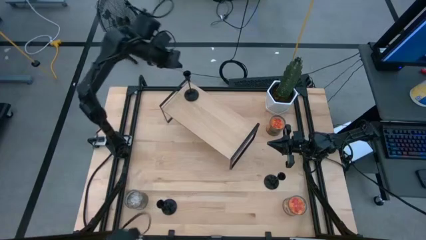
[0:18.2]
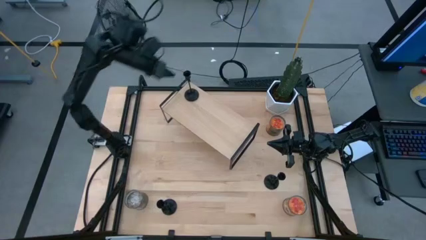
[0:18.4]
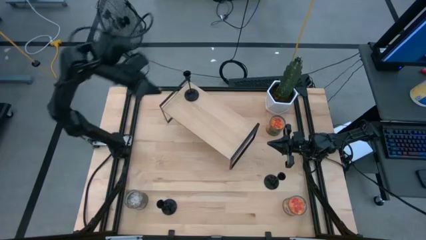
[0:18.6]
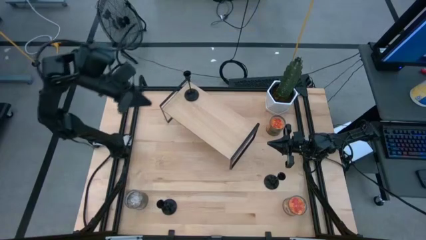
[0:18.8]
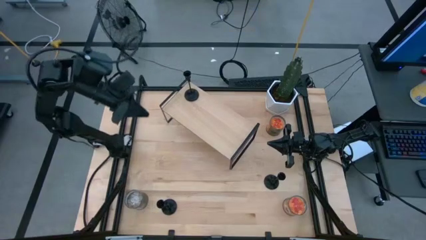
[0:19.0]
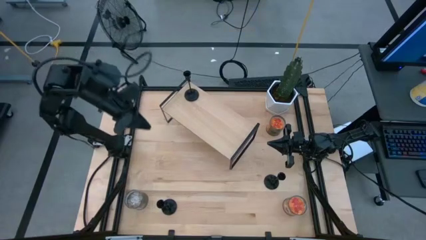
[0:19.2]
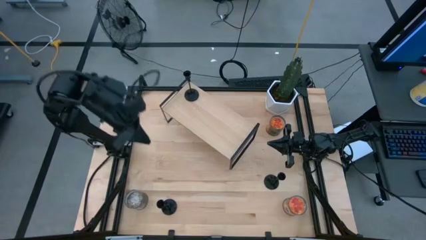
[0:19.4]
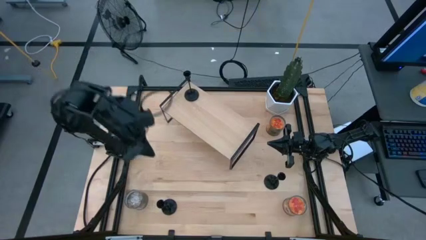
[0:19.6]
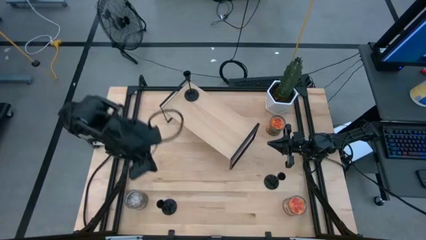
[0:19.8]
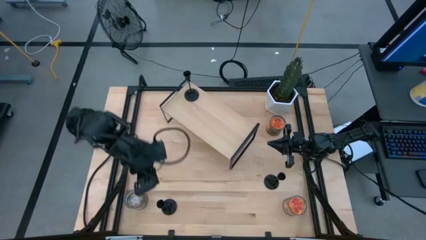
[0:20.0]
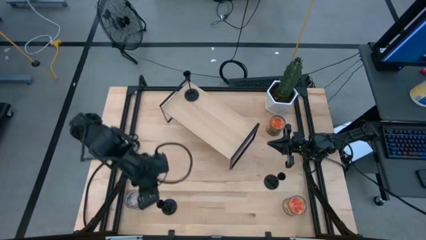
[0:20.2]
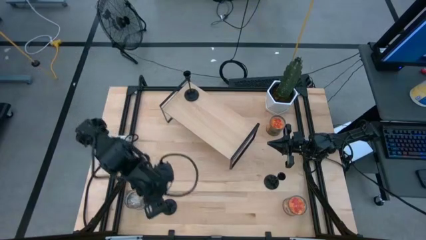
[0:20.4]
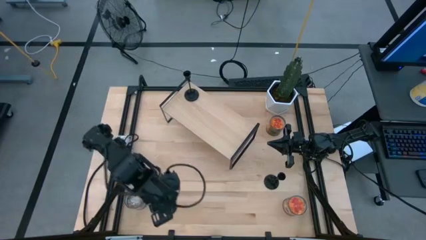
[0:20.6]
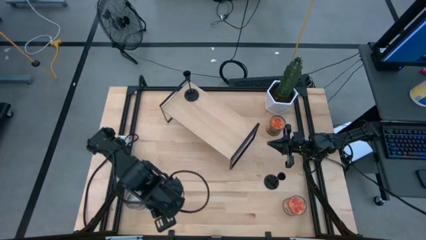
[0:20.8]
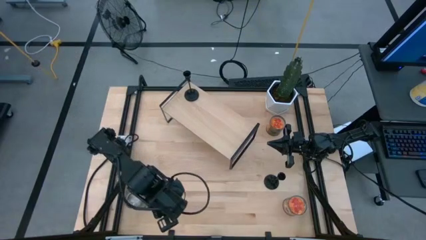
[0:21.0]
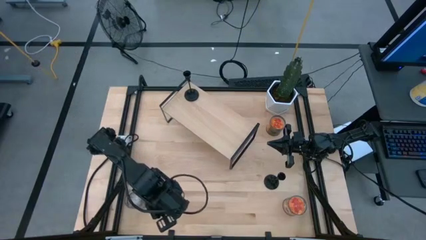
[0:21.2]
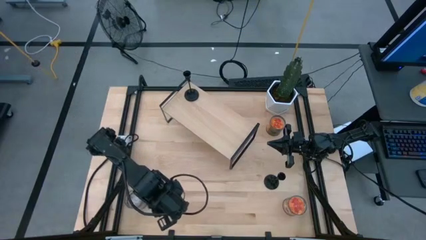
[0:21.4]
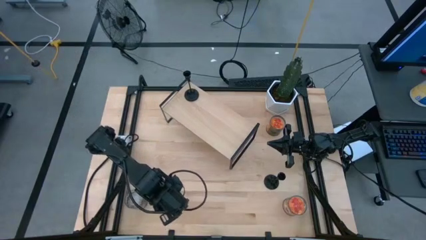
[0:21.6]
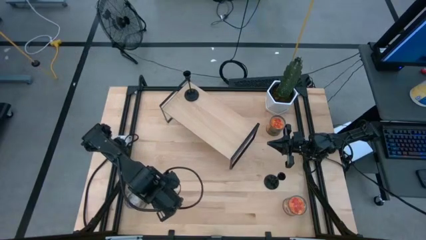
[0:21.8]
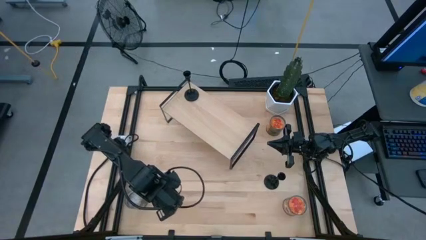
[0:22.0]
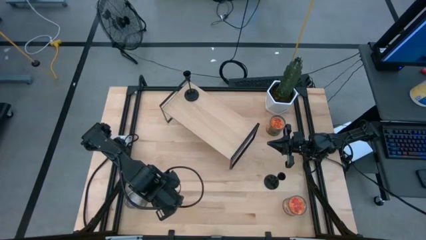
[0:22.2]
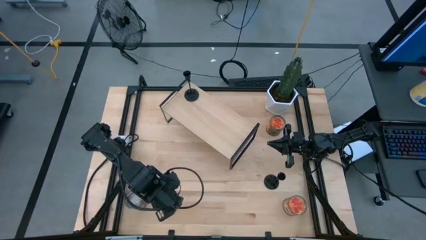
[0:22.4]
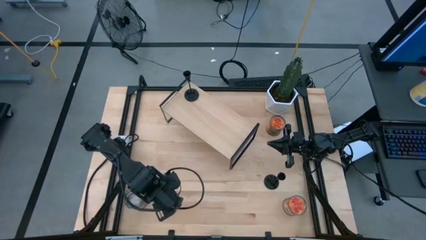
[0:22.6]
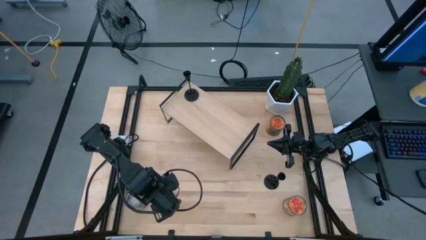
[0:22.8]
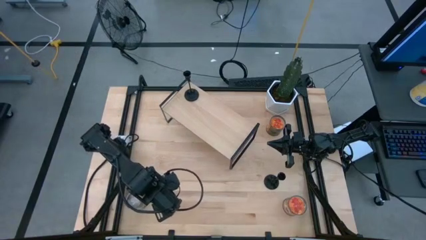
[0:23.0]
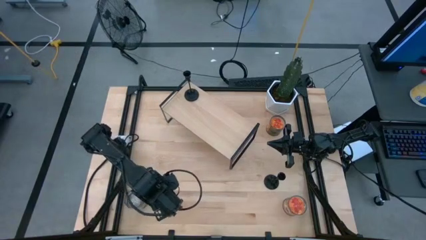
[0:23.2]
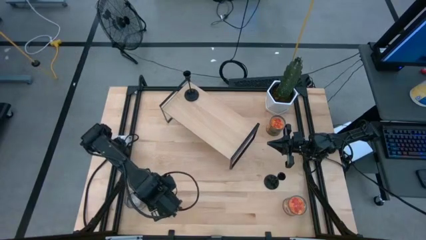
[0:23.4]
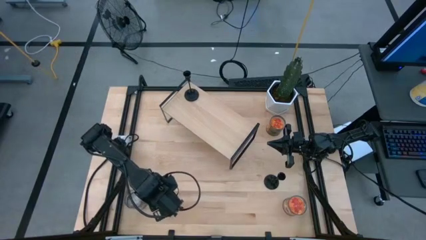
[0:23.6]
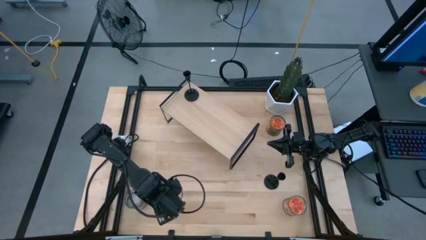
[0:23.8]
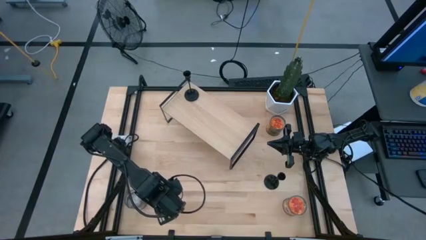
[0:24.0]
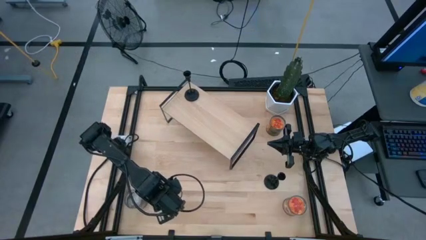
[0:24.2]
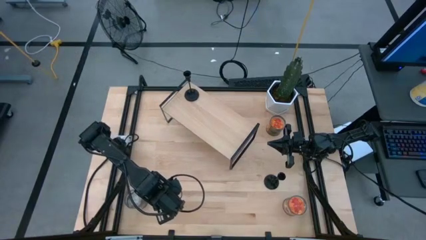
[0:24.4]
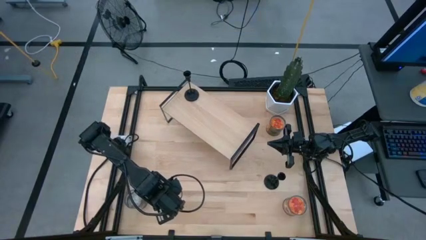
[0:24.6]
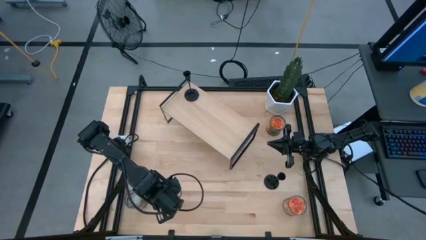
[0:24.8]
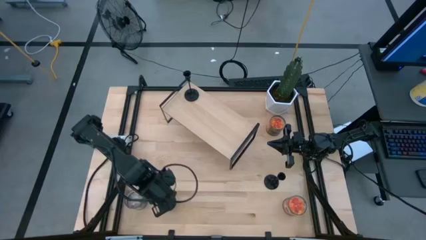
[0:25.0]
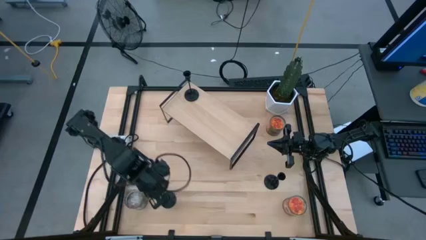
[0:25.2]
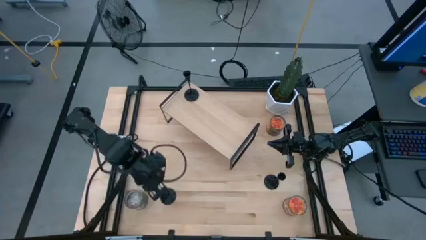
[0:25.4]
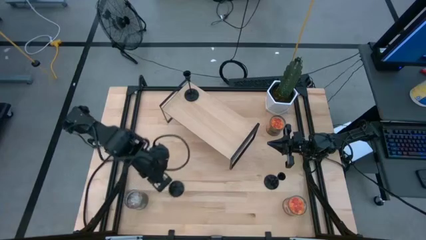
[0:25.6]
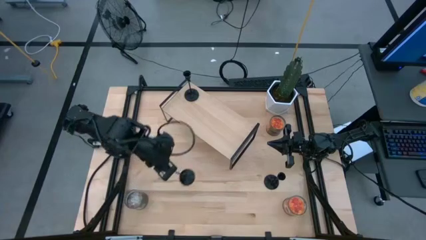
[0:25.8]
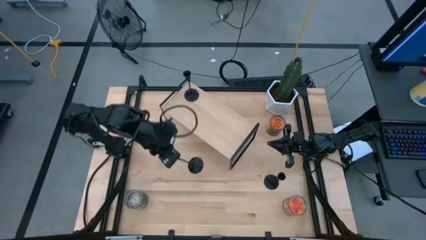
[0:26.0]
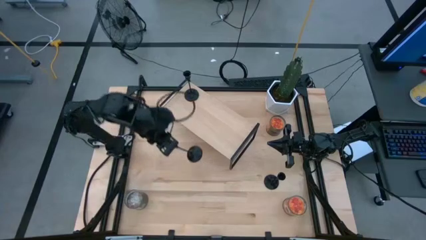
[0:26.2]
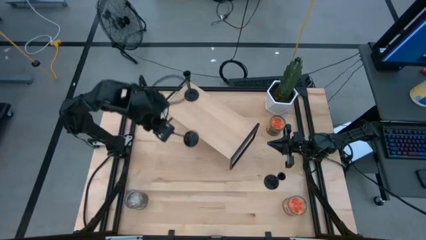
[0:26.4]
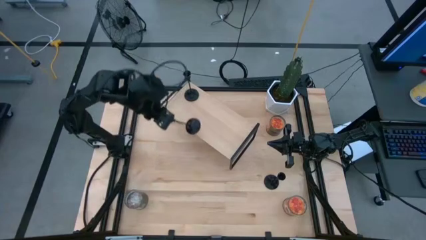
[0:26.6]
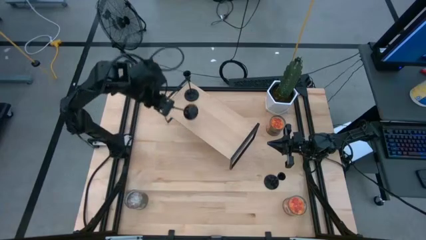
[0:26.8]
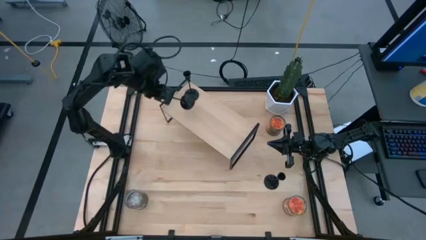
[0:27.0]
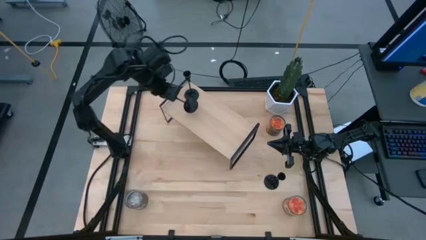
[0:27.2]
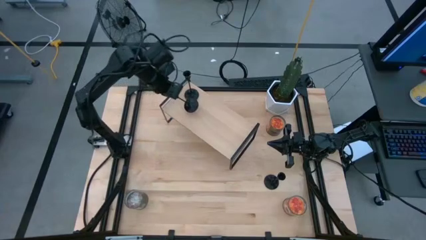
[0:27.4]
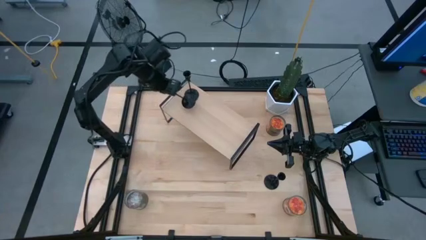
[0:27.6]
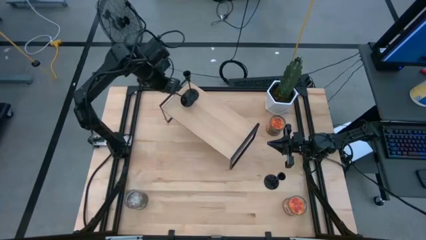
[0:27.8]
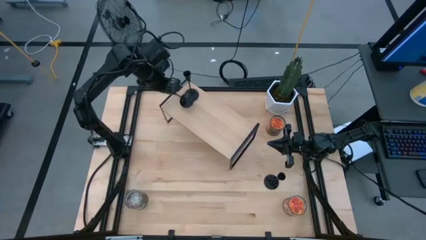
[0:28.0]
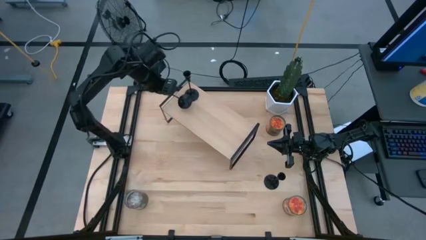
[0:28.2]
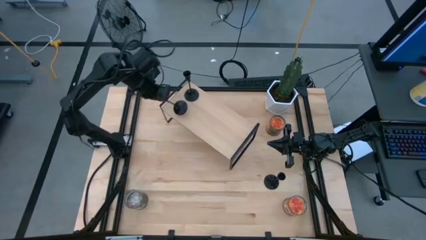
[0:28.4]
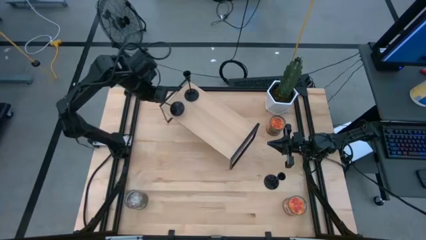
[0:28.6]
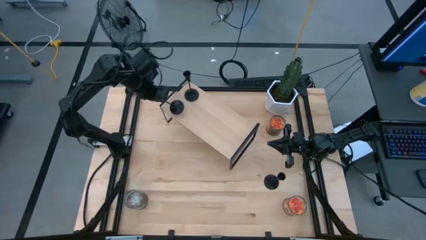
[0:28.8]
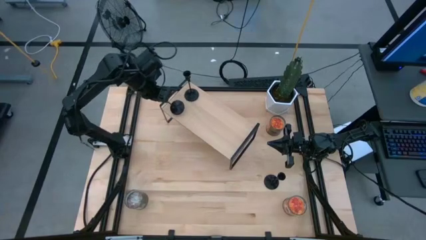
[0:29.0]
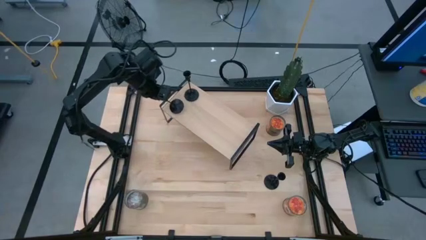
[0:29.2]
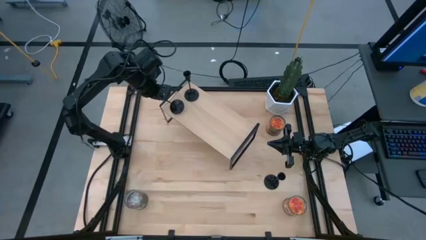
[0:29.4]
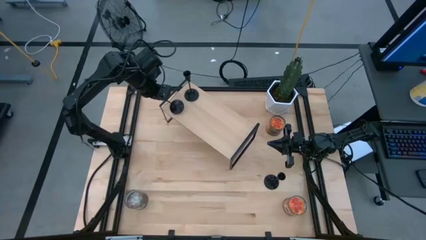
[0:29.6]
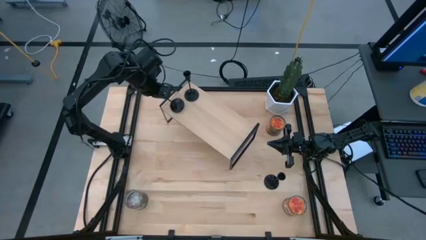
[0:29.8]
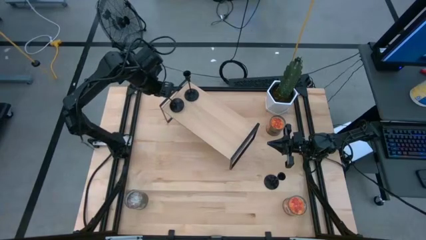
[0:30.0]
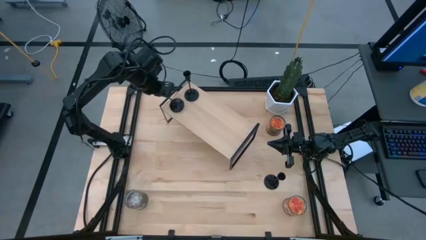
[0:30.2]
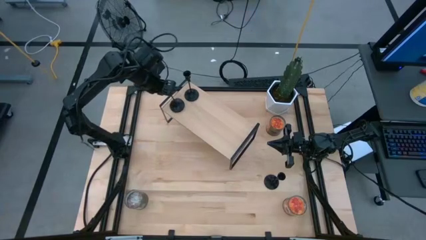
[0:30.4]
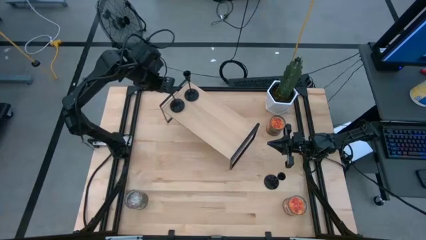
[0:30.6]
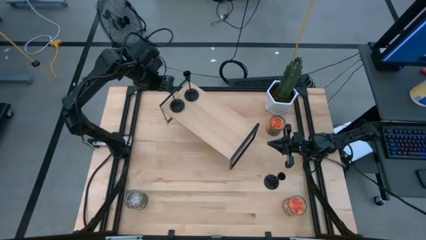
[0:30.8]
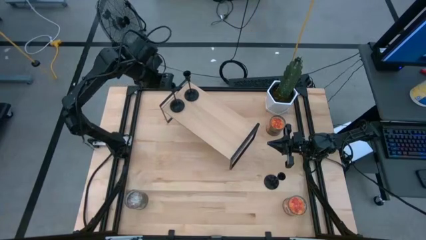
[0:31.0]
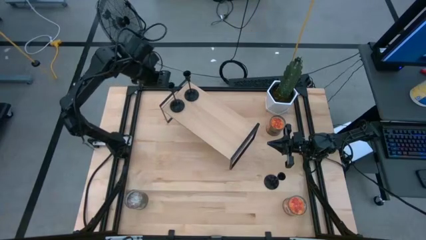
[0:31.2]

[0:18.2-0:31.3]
Task: Pick & Place candle stick holders
Put the left black candle holder on the shelf

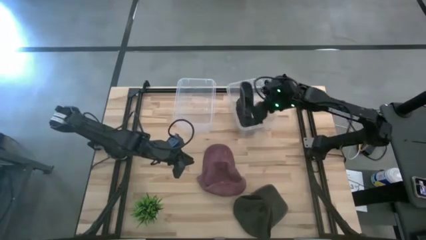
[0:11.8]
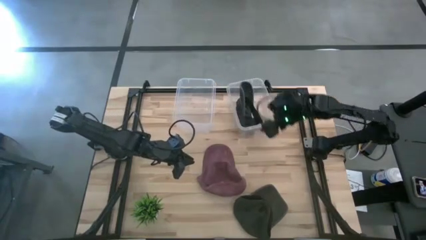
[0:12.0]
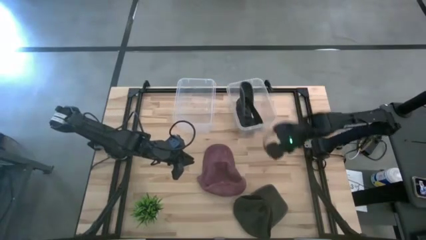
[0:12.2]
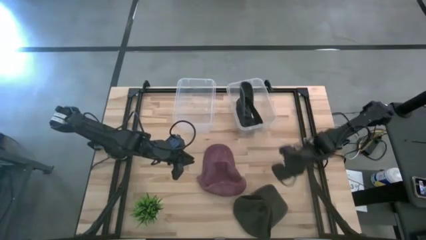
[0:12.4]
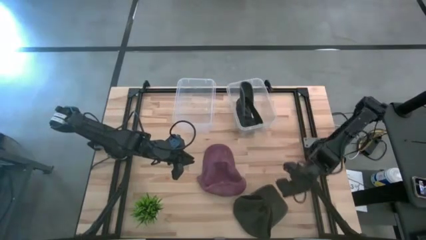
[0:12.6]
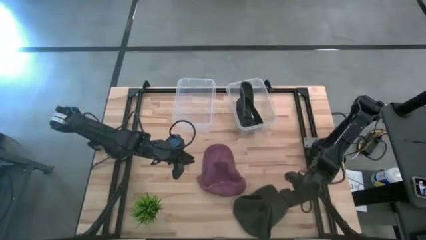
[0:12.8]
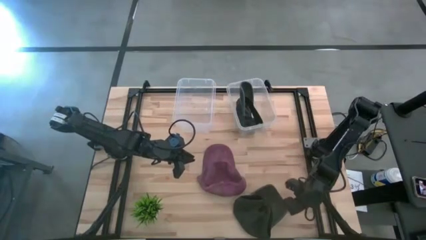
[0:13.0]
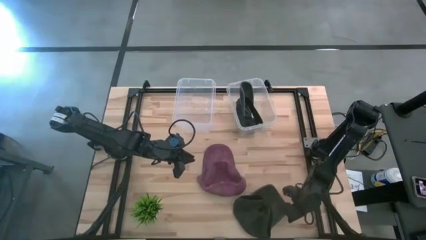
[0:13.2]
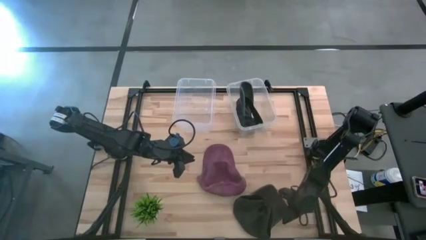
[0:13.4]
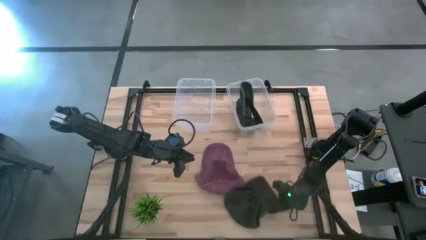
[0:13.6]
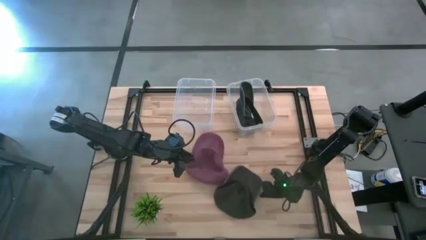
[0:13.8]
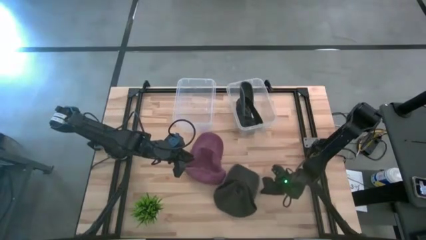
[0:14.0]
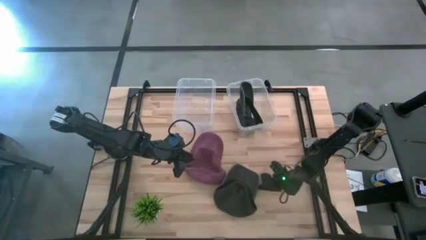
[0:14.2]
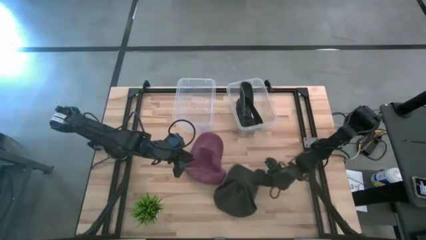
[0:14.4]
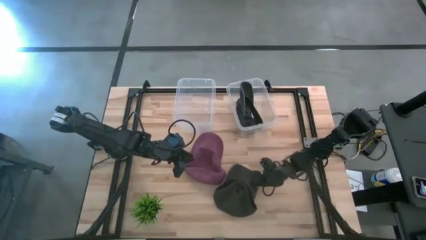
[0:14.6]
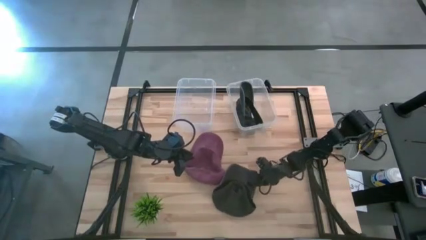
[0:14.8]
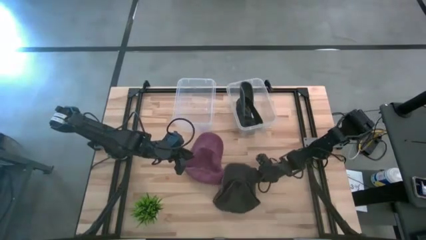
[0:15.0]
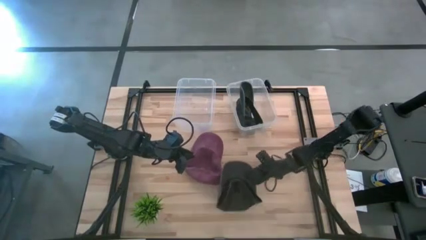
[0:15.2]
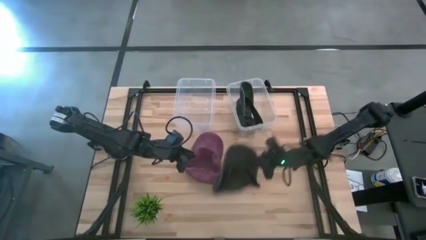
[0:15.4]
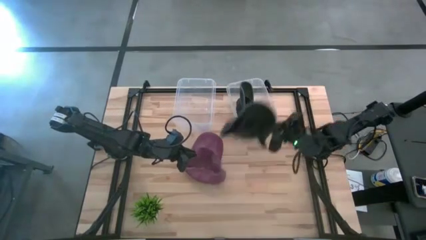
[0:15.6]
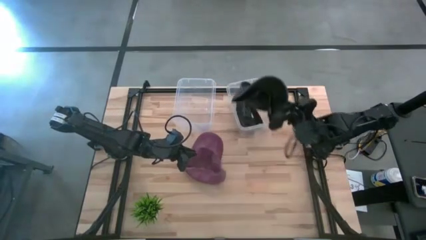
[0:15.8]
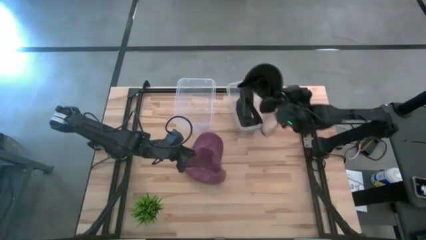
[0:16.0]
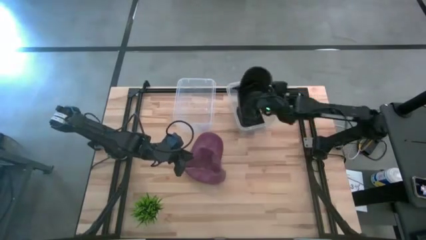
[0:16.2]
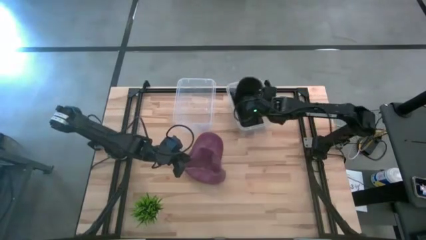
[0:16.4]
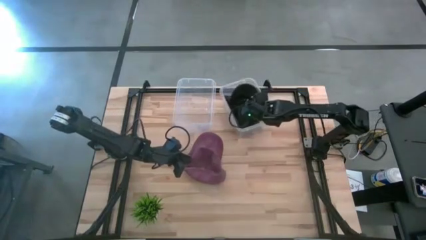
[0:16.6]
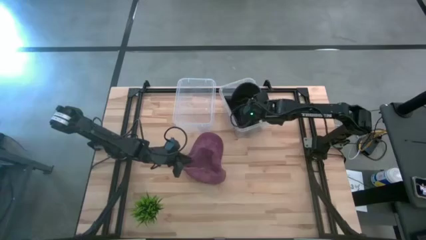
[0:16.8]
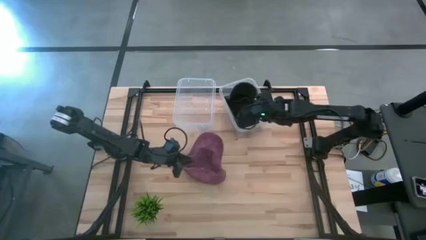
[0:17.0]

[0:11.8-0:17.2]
Task: Pick and place caps into container
Put the black cap into the right transparent container
